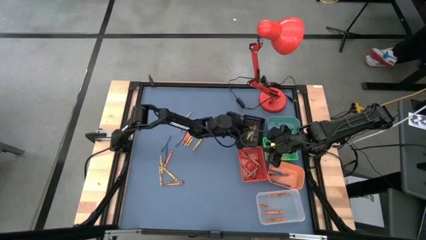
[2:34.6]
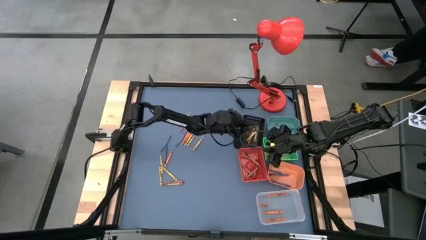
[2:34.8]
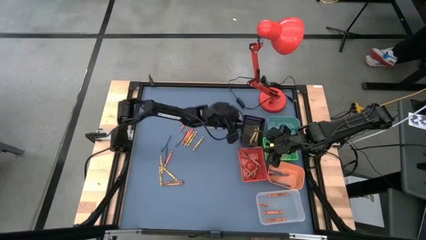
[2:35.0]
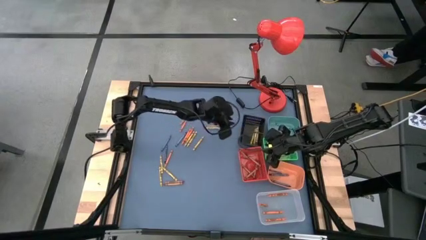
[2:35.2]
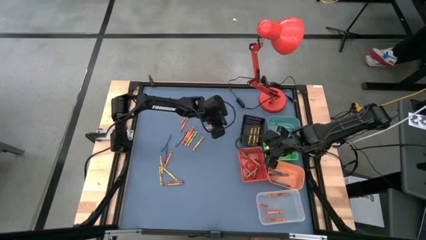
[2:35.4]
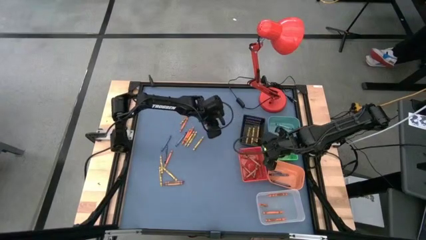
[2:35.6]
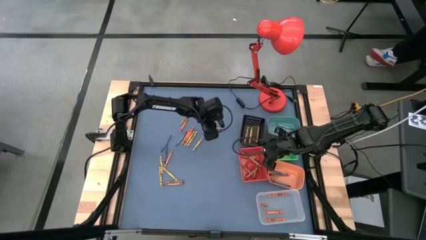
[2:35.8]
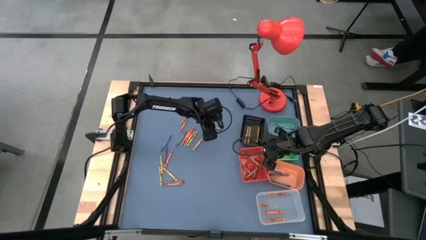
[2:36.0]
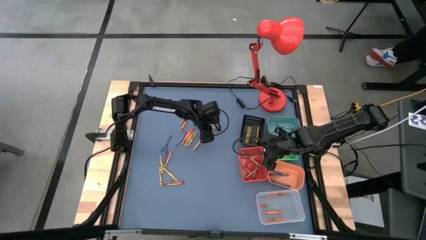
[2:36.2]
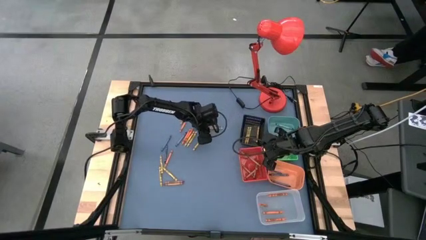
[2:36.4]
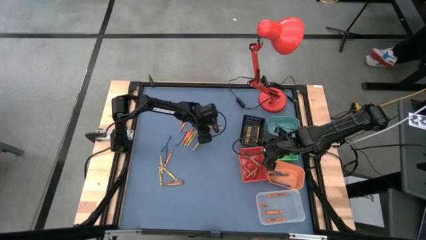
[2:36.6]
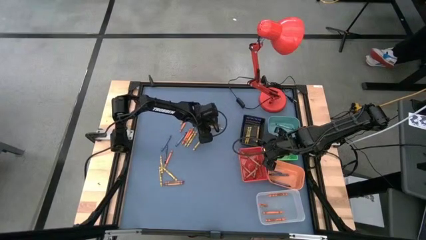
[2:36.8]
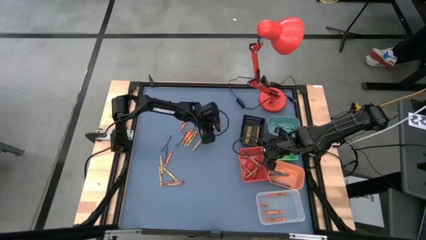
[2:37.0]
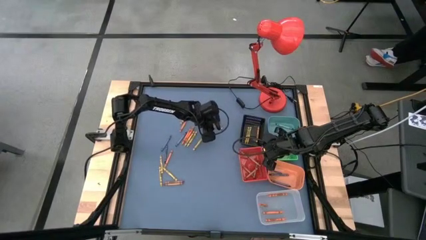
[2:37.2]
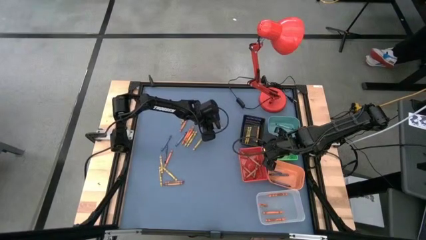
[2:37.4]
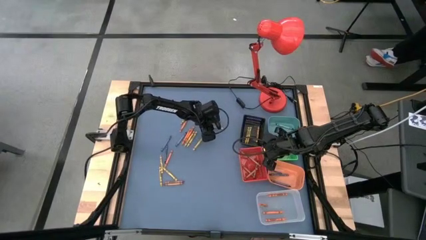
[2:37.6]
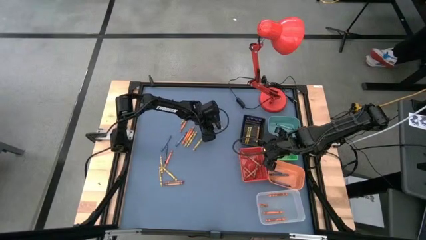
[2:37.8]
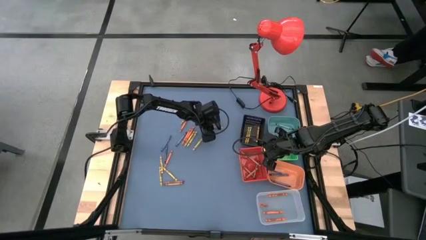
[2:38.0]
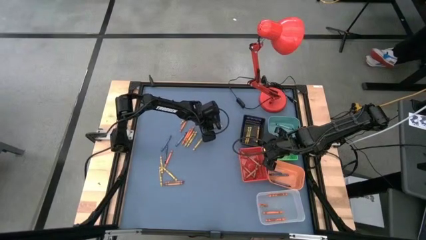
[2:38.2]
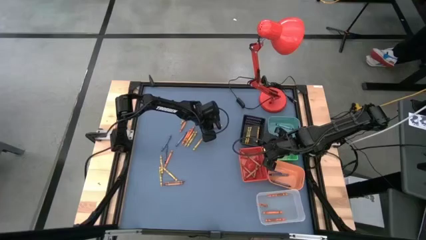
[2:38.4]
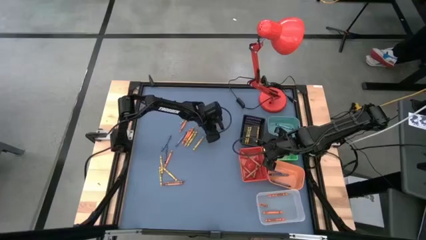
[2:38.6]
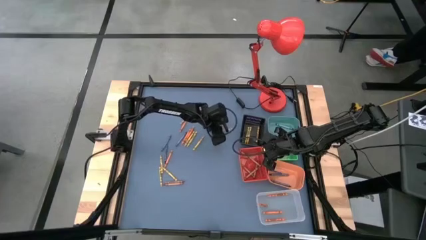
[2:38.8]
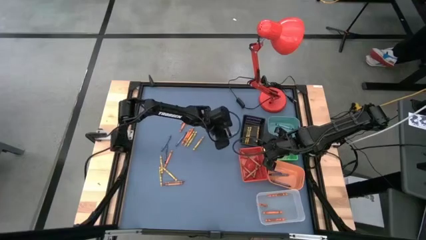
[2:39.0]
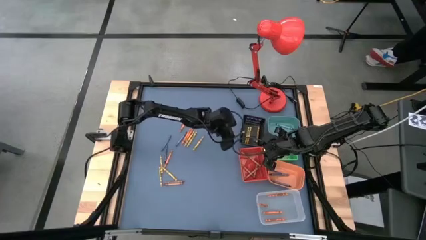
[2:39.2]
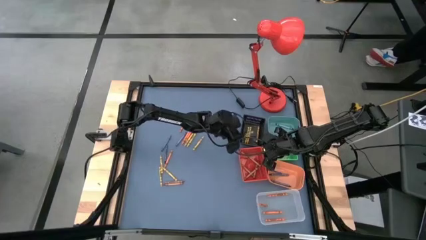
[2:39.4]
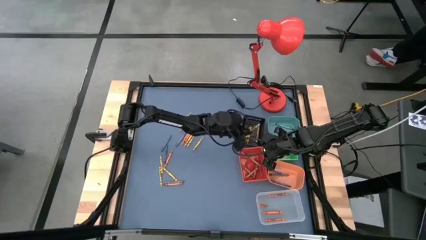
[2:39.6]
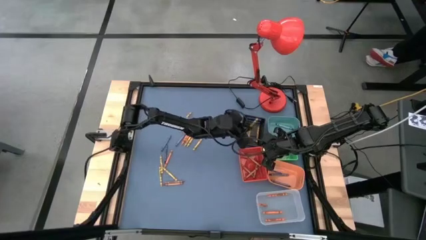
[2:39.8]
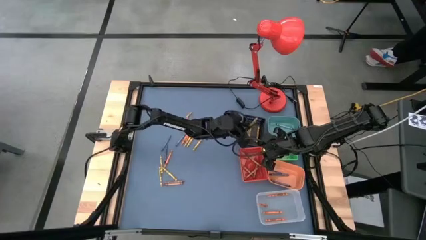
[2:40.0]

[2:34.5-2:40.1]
Task: Sort crayons
Put the yellow crayon into the black basket

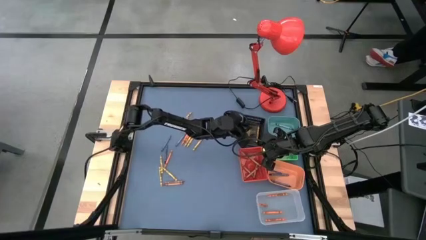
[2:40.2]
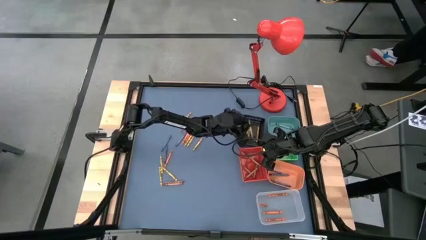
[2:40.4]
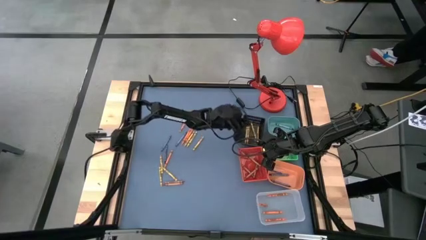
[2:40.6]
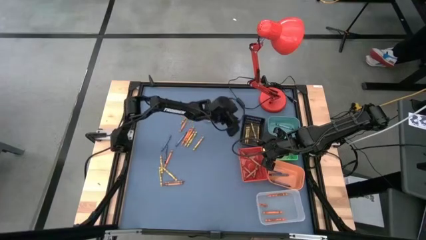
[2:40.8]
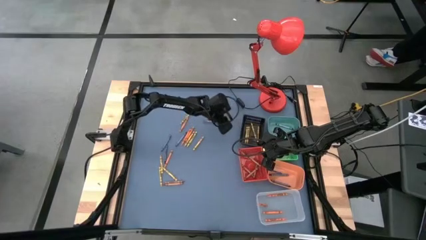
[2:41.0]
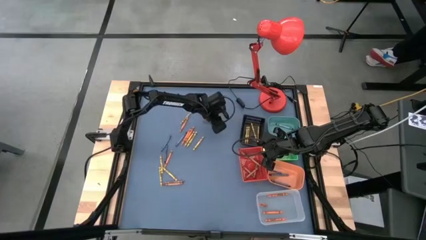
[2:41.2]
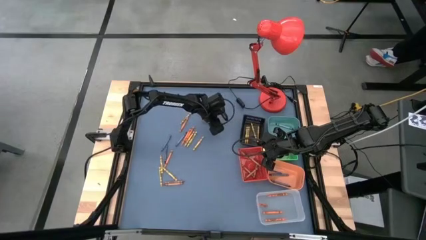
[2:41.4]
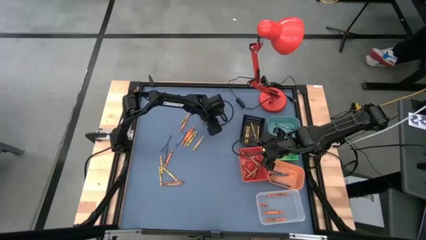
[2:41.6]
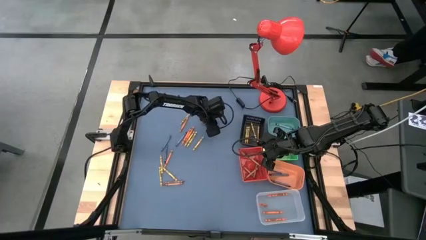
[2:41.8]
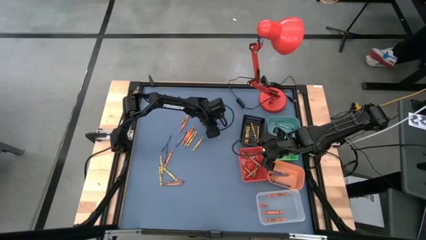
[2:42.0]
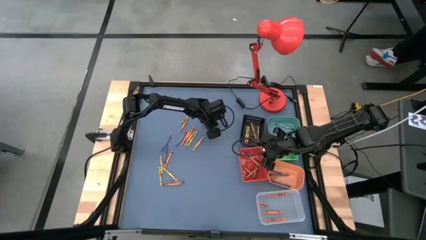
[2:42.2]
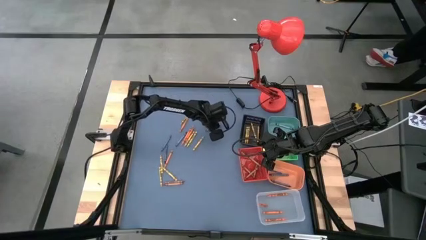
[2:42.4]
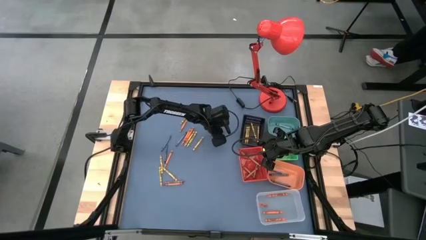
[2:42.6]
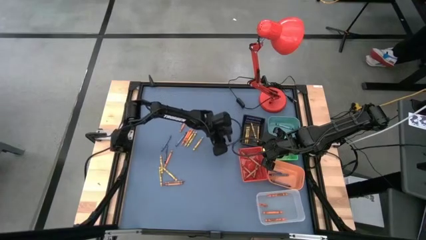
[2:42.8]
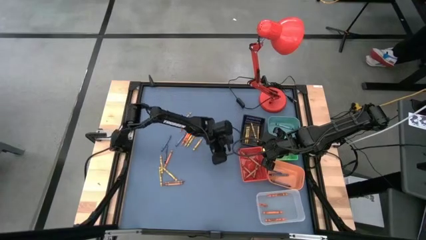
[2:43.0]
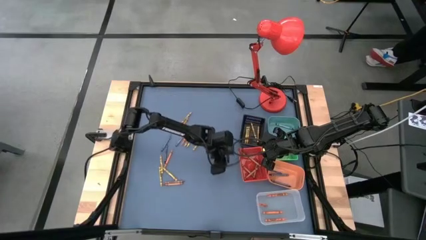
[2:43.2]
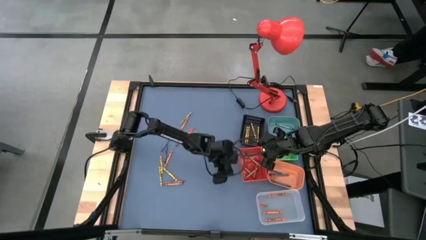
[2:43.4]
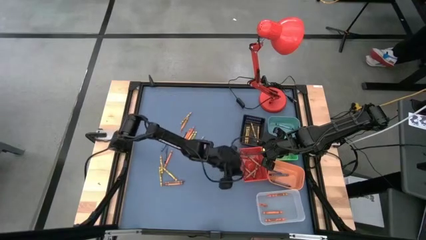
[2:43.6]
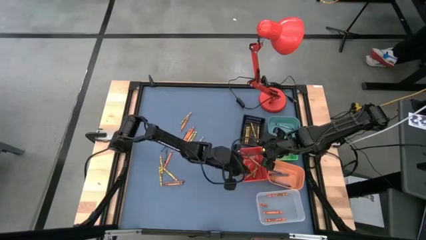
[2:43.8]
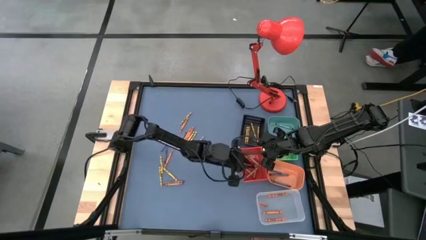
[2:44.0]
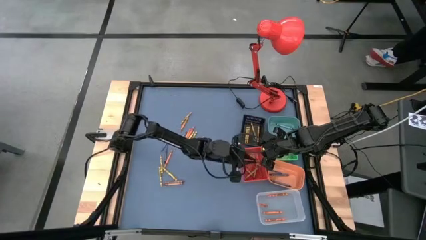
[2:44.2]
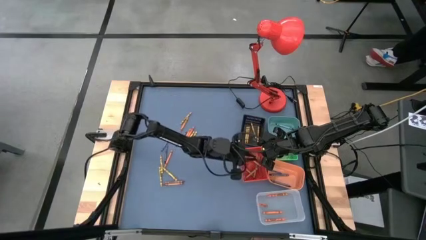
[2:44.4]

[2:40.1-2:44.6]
Put the brown crayon into the red basket

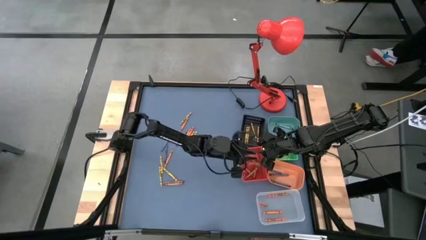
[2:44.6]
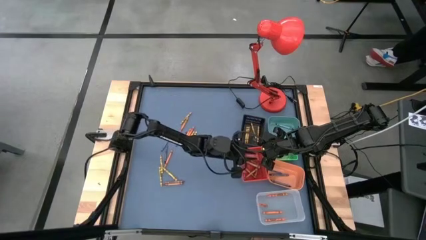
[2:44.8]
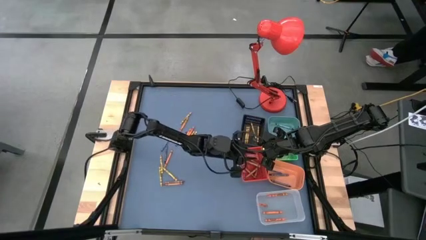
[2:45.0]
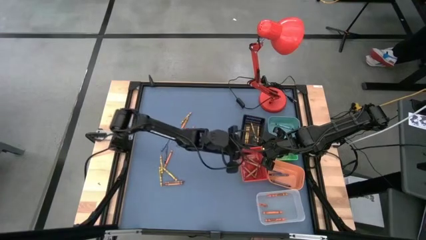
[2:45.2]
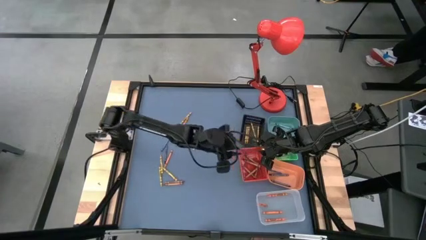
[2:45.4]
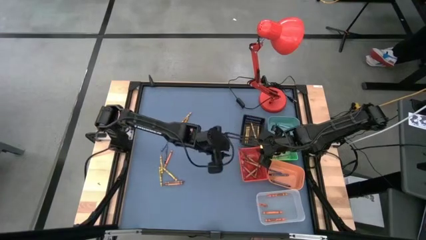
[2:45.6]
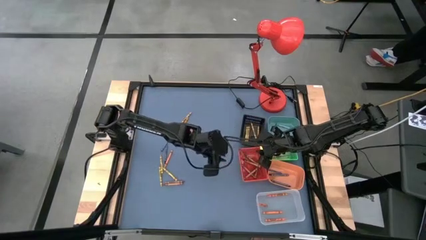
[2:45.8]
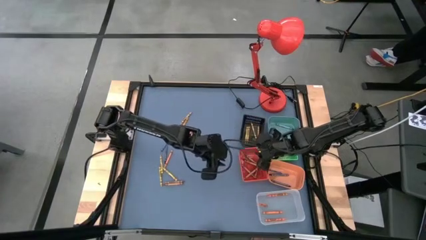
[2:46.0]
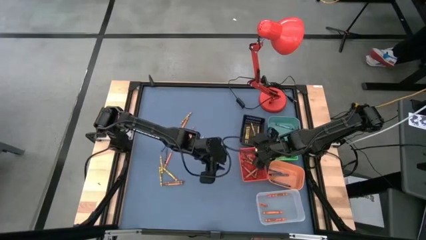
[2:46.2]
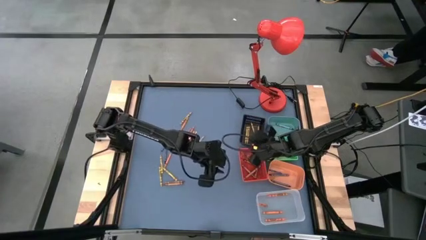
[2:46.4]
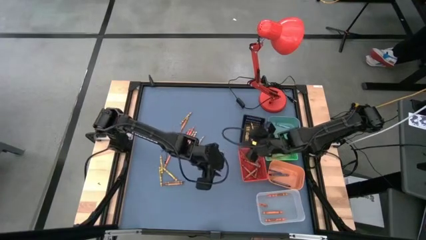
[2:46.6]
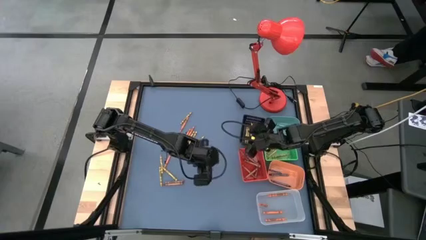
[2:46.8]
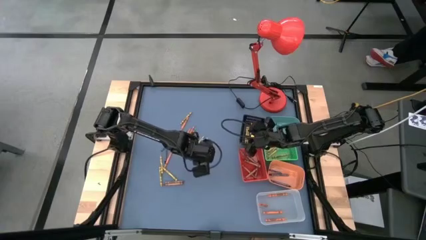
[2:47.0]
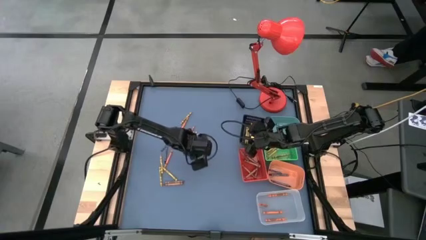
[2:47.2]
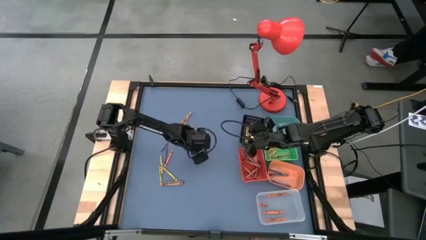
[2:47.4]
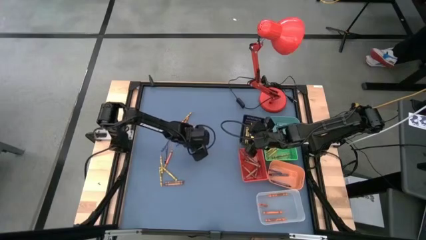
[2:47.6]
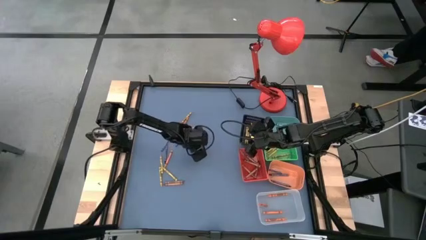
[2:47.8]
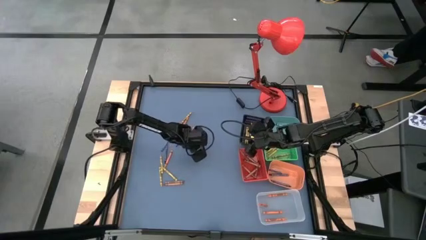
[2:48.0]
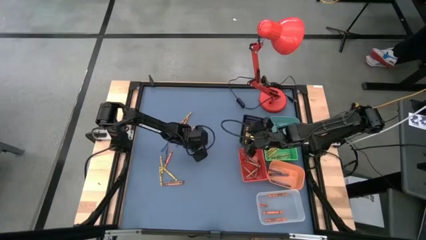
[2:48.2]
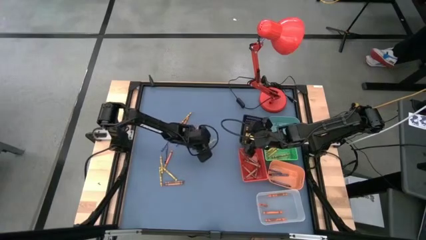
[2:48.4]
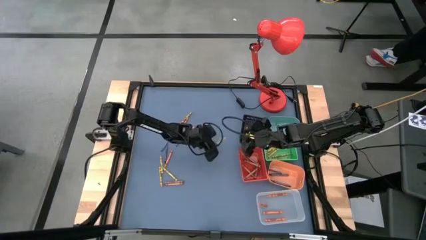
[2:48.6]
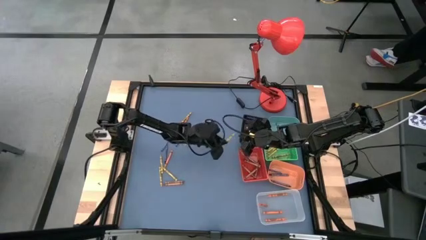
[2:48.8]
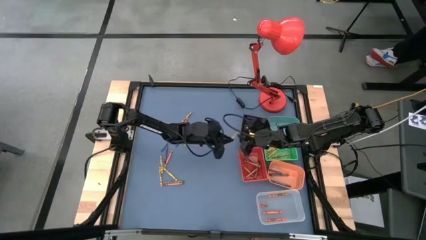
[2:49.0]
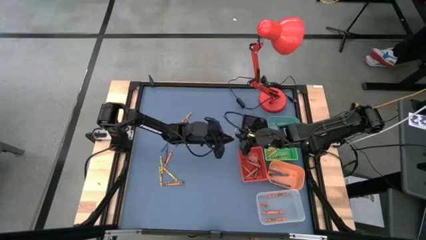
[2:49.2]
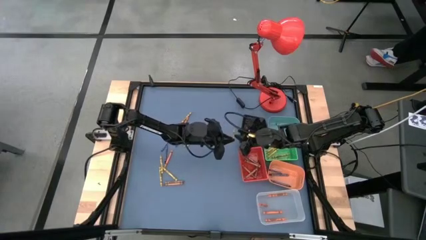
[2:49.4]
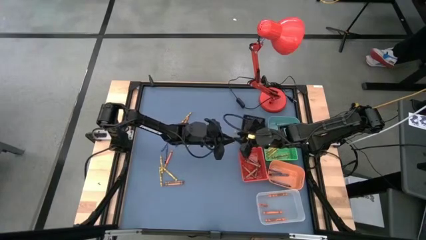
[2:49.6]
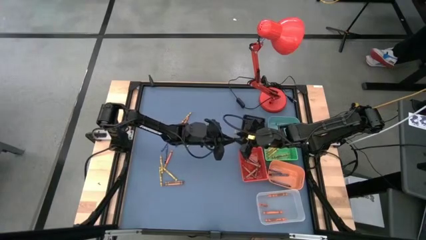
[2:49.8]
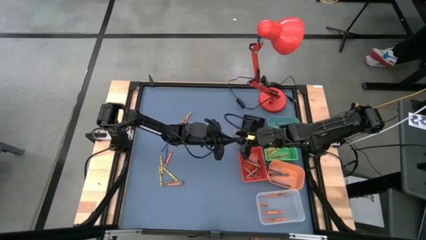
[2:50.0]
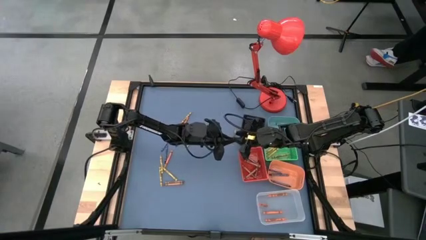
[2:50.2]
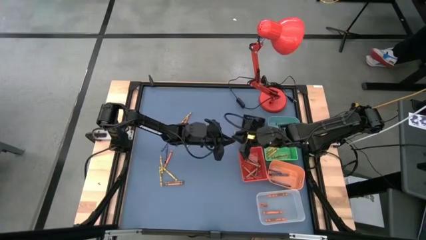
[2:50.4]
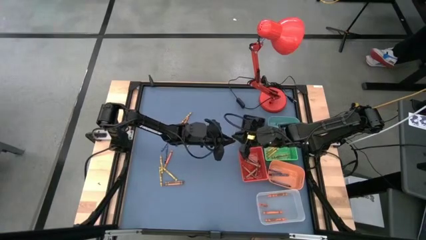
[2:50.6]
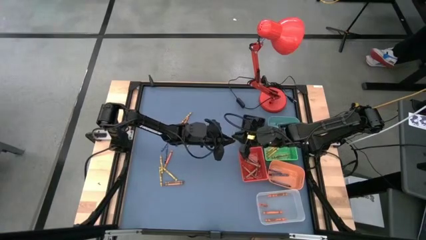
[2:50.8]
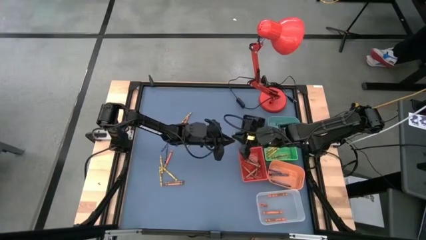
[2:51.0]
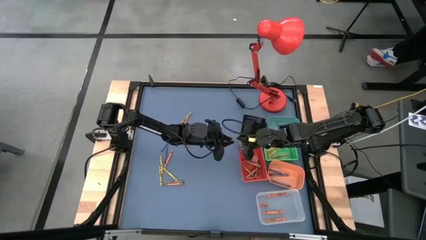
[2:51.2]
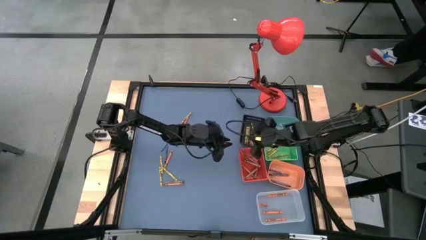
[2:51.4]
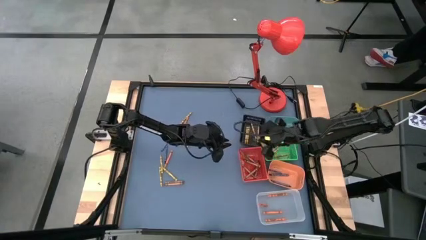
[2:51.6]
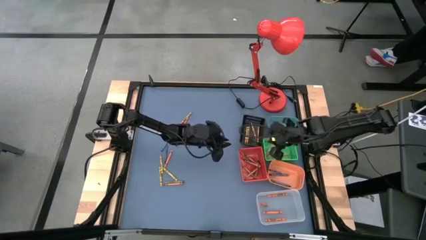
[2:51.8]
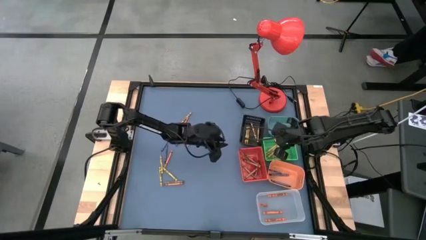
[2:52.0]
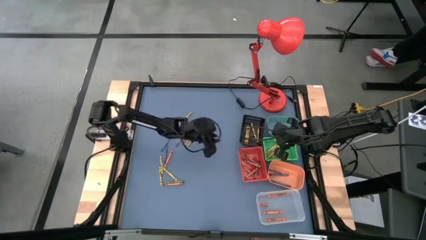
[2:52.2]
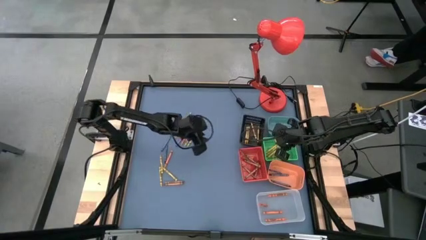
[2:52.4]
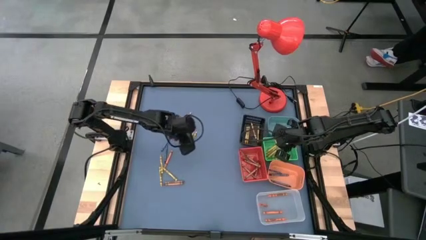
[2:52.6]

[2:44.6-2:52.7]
Put the yellow green crayon into the green basket
